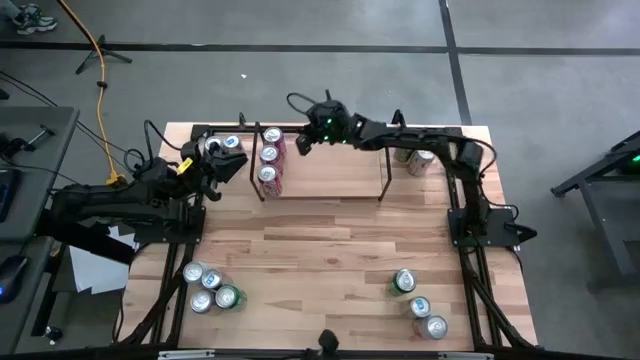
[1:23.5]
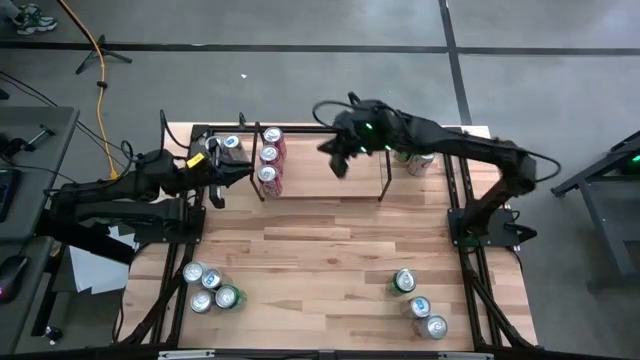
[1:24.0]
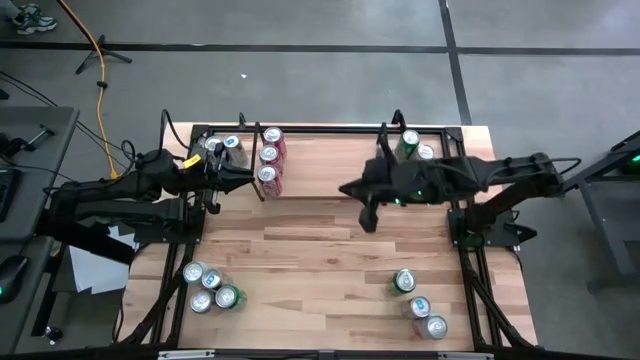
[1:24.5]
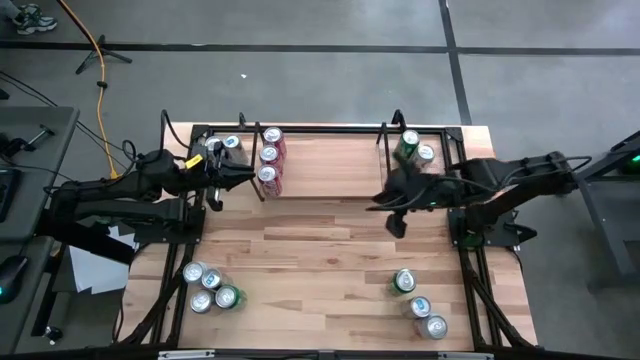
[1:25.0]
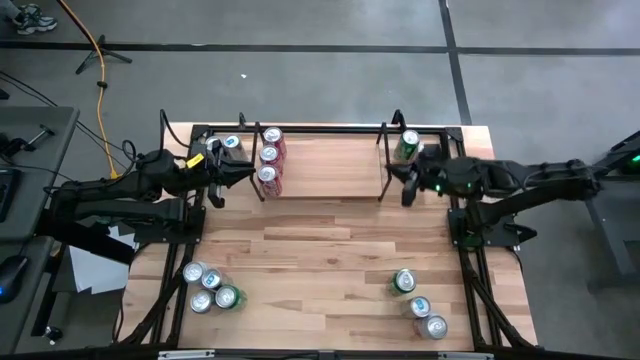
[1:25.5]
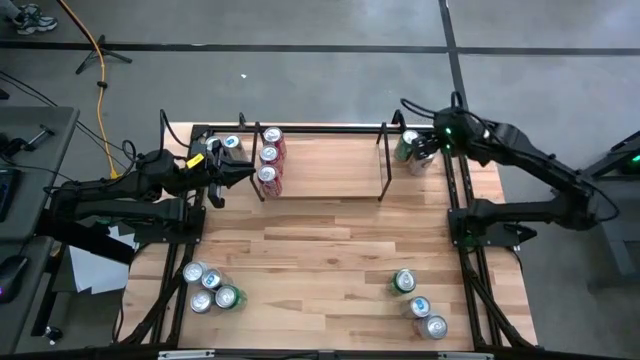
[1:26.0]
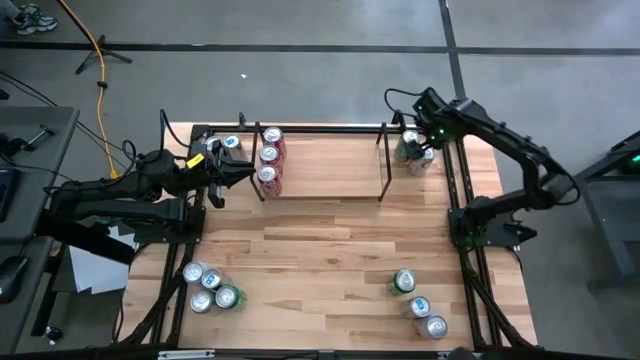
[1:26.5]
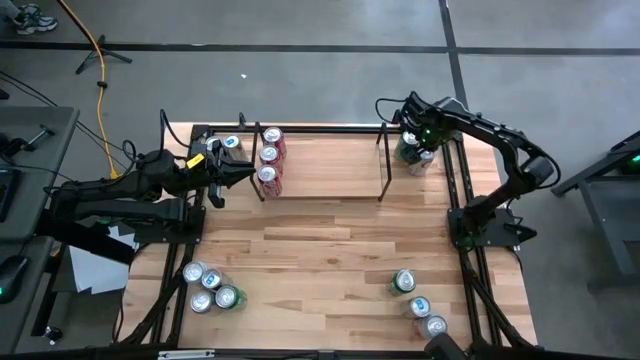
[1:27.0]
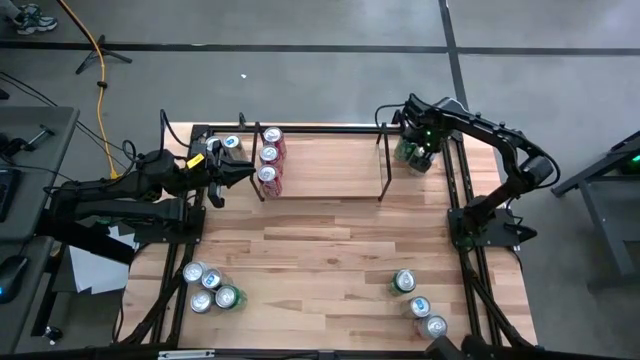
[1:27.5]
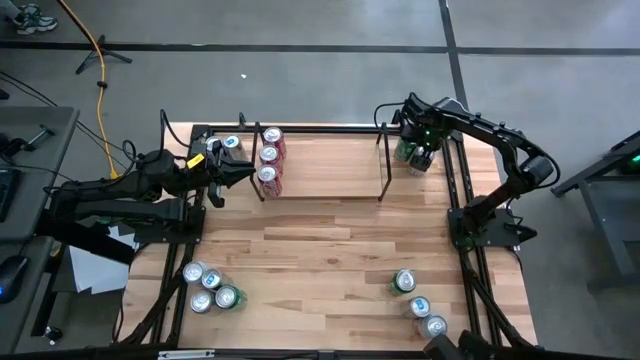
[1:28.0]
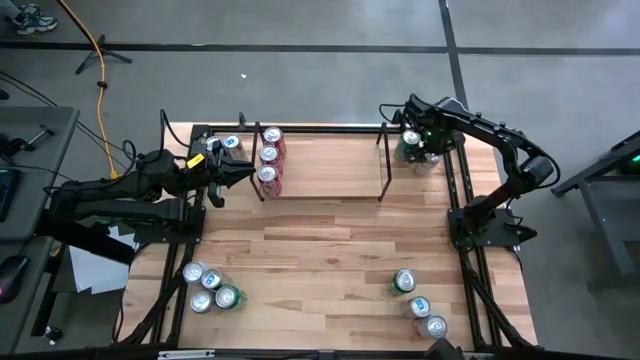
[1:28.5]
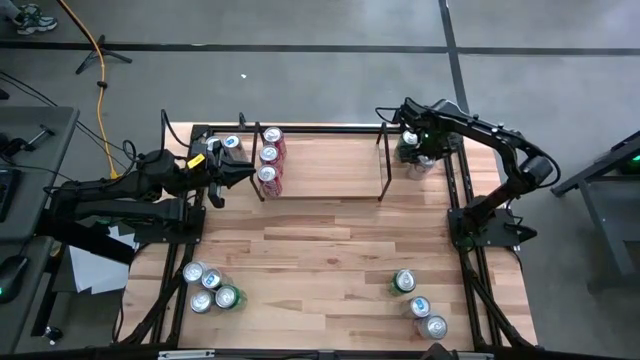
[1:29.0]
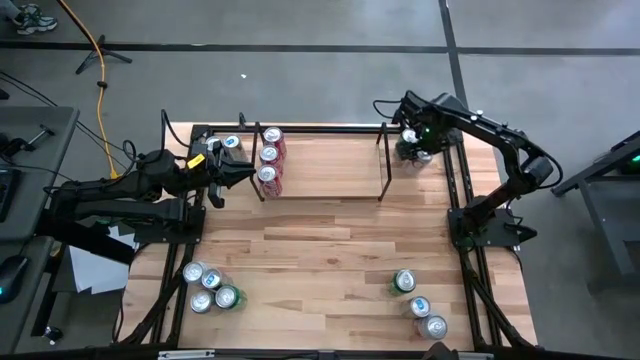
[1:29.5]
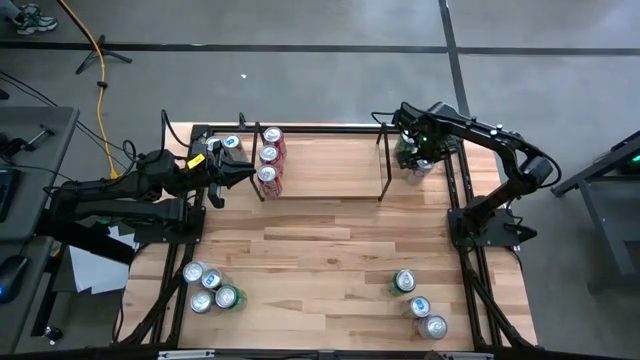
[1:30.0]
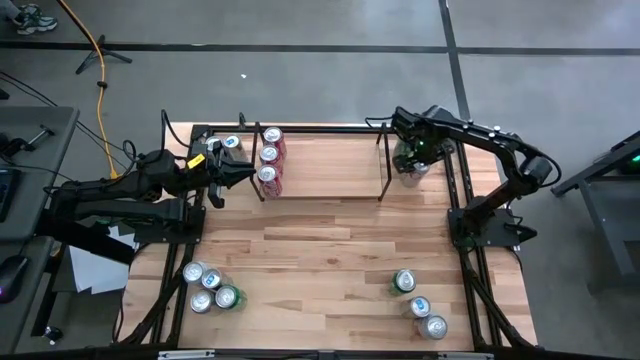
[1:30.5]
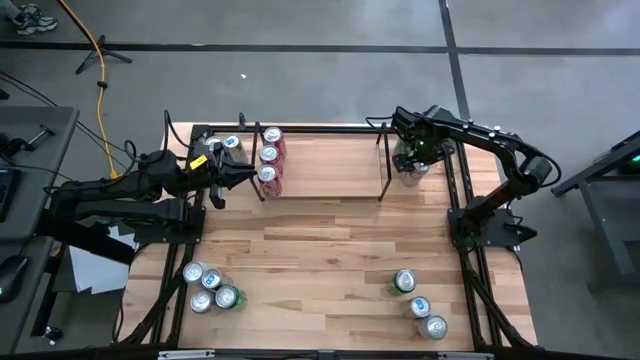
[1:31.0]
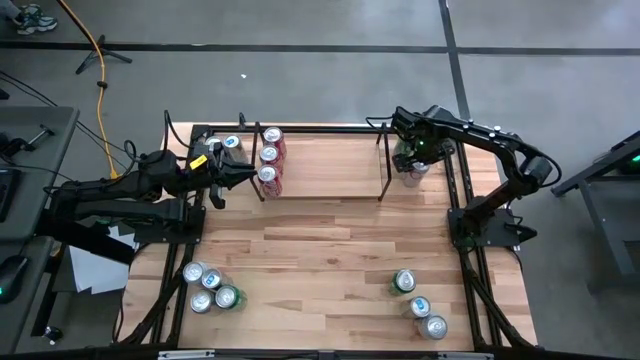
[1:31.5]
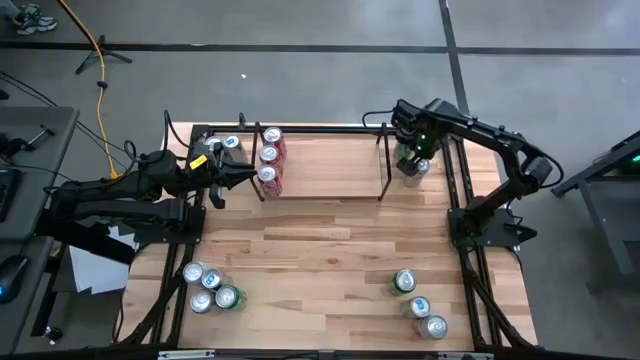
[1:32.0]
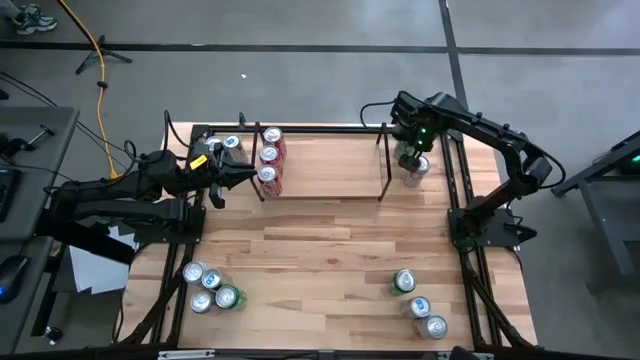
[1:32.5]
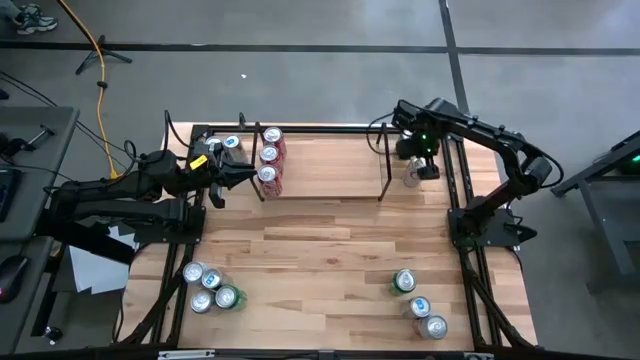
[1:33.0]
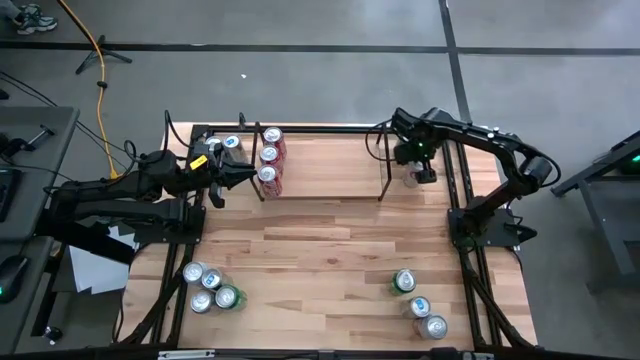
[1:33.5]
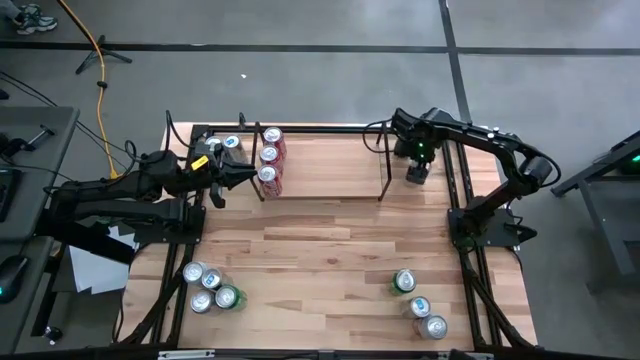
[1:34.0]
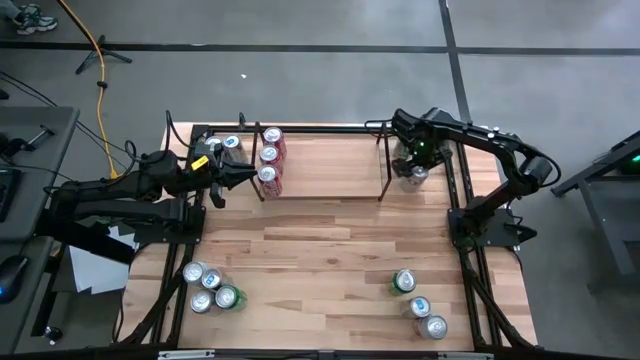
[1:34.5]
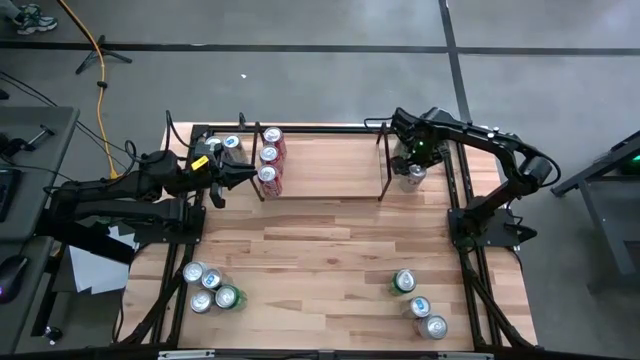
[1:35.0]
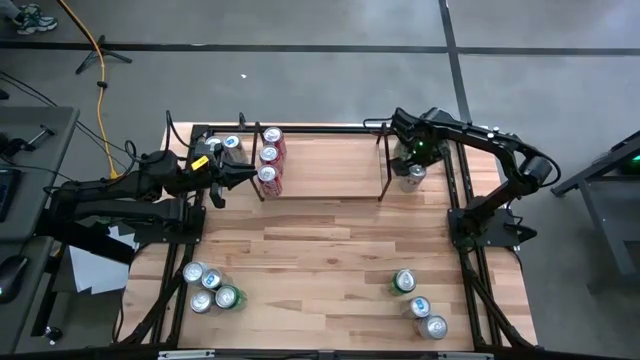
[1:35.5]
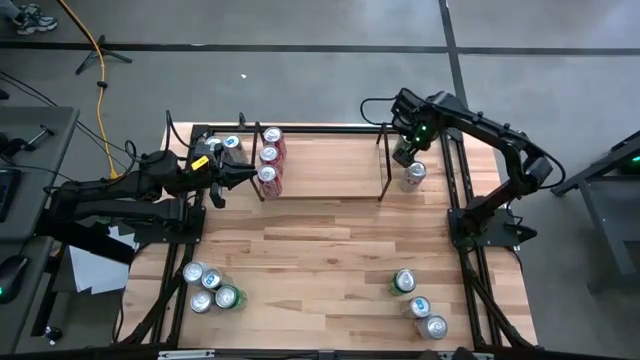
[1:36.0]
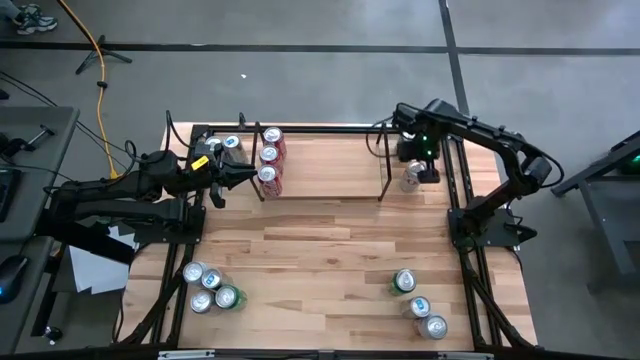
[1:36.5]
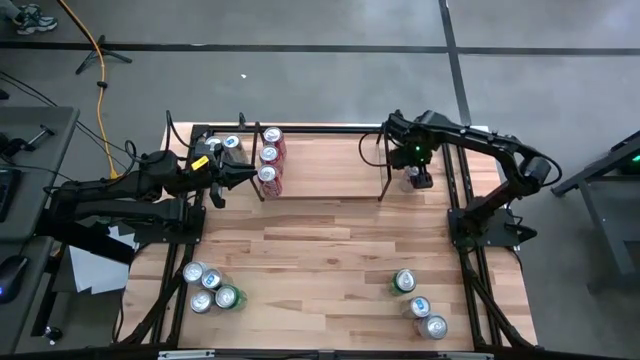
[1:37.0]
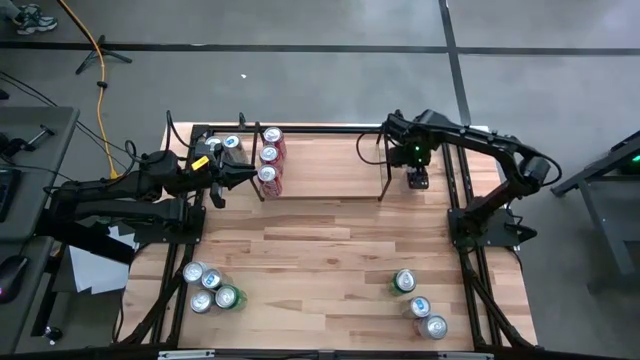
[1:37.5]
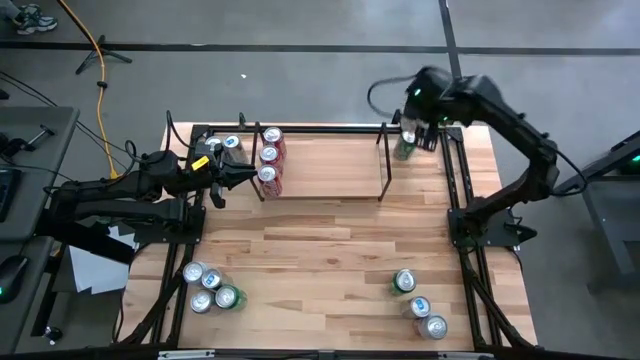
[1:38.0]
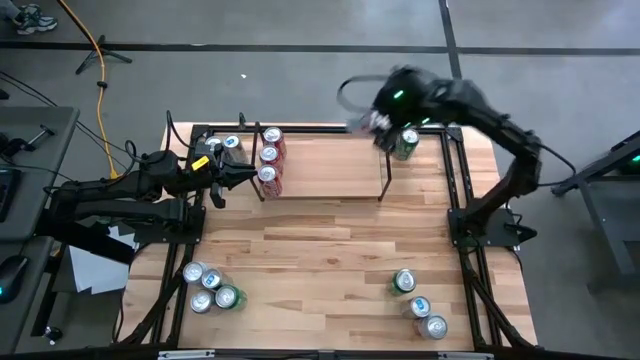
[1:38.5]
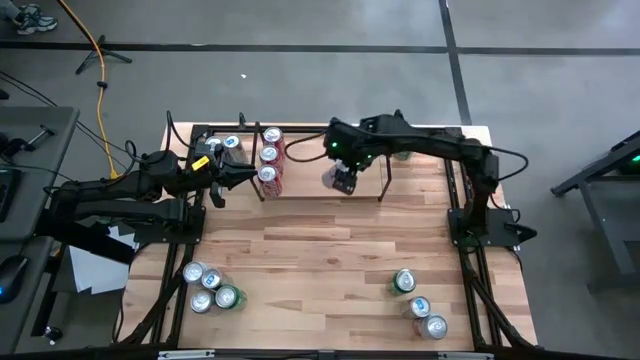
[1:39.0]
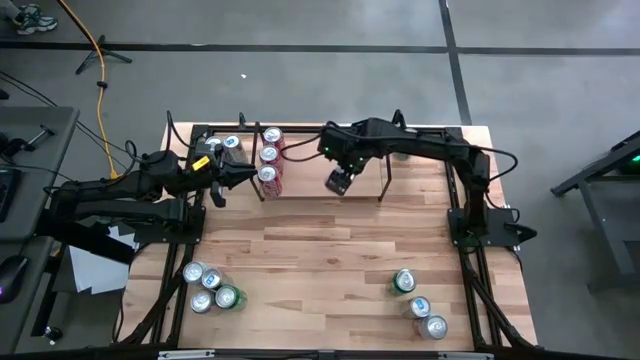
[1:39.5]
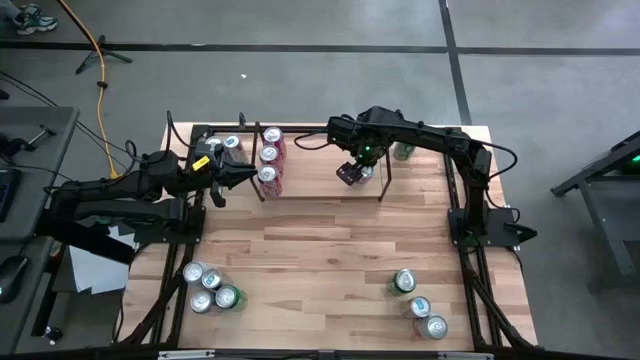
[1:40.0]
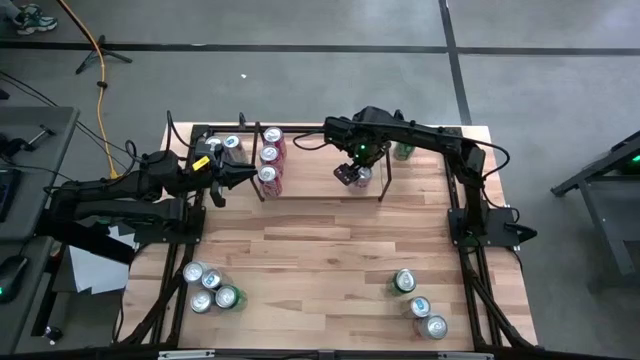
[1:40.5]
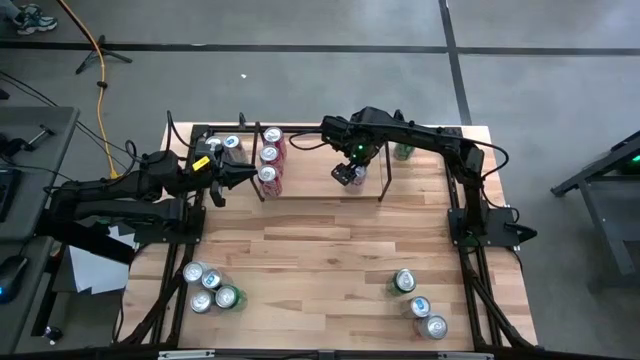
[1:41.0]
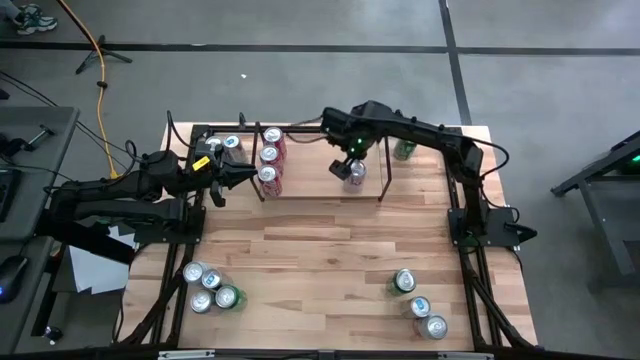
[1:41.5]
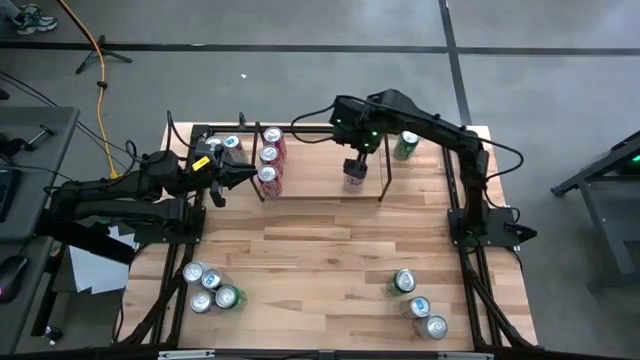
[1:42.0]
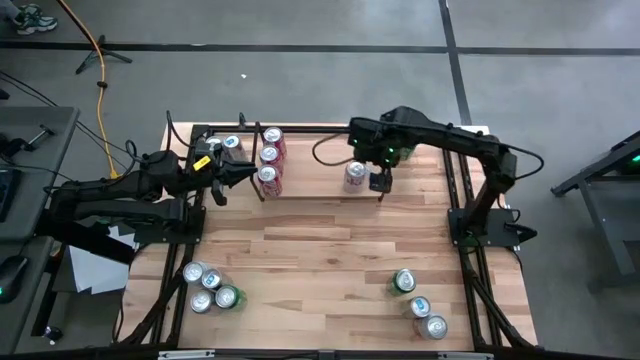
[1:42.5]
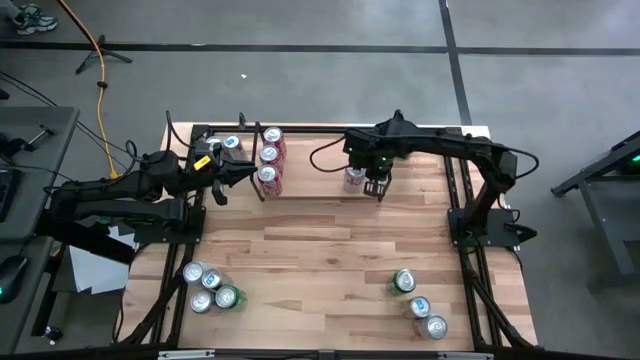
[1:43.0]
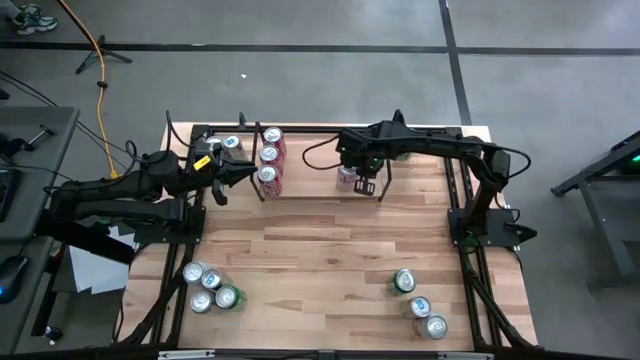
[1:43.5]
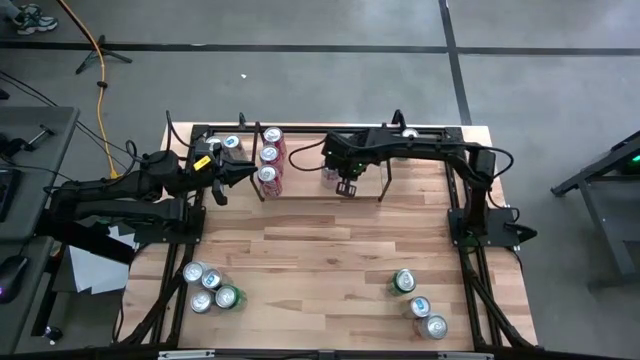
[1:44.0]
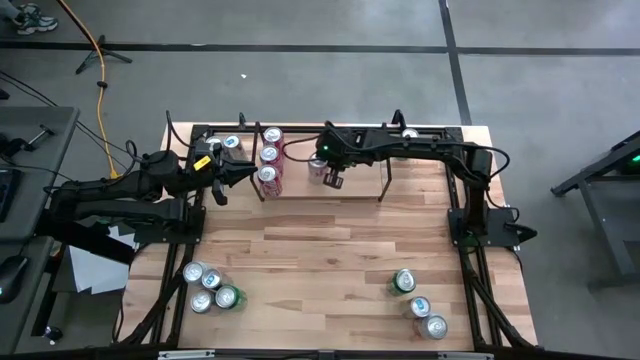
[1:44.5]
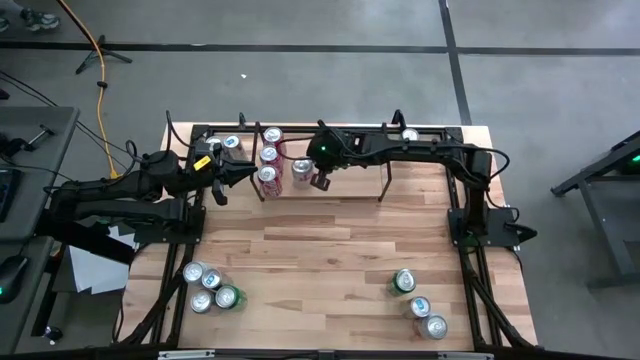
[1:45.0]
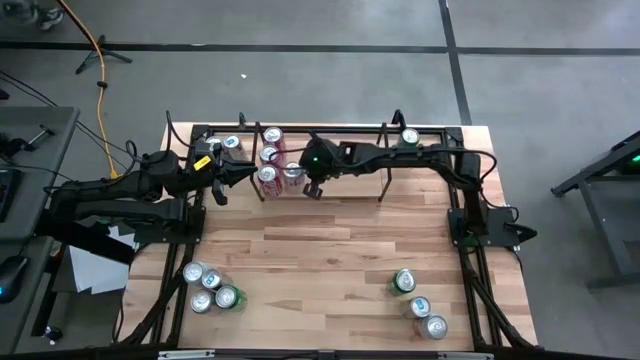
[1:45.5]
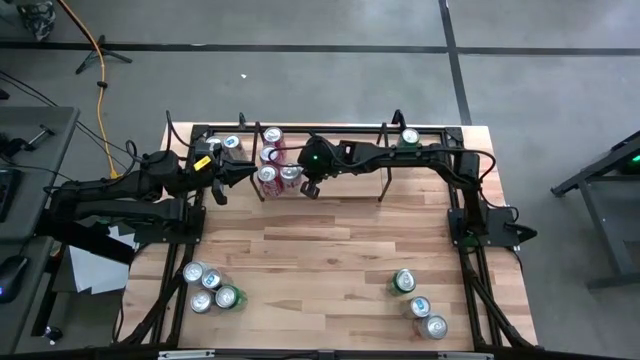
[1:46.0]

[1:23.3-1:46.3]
Task: Place canned beverage on shelf
Put the top right silver soda can on the shelf
